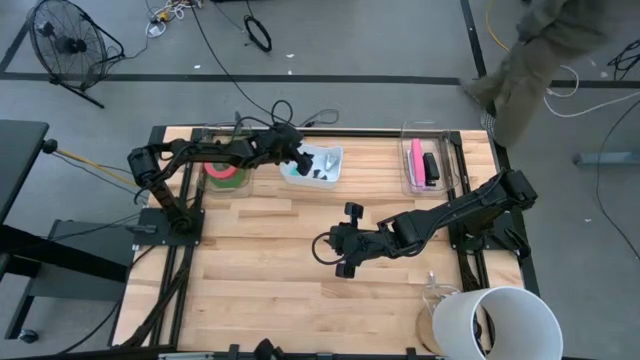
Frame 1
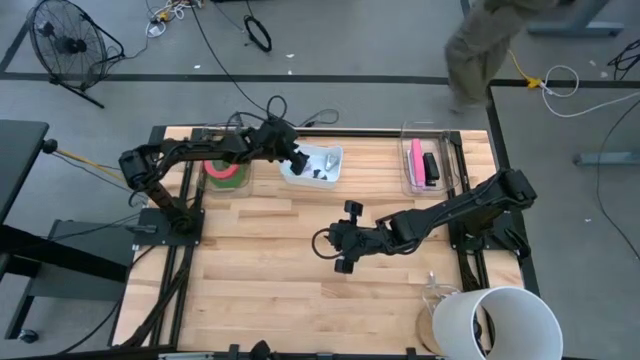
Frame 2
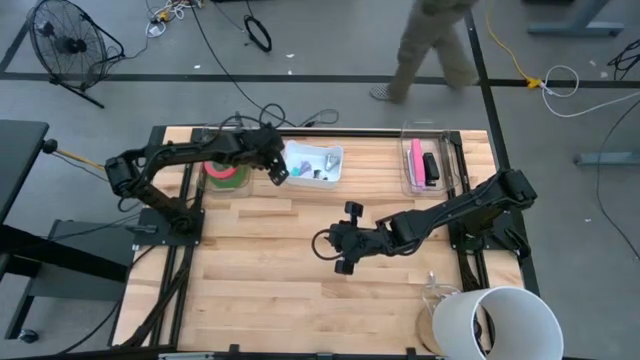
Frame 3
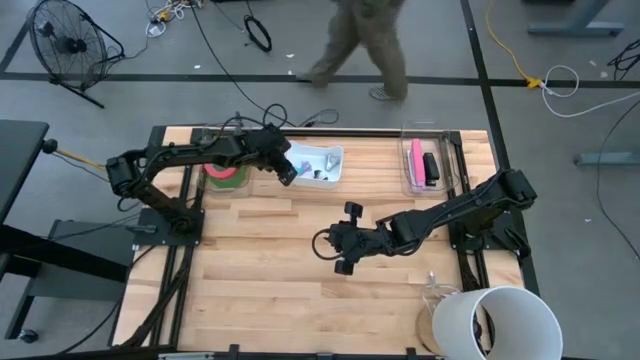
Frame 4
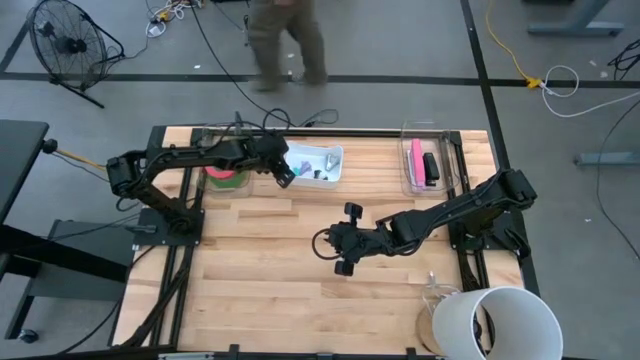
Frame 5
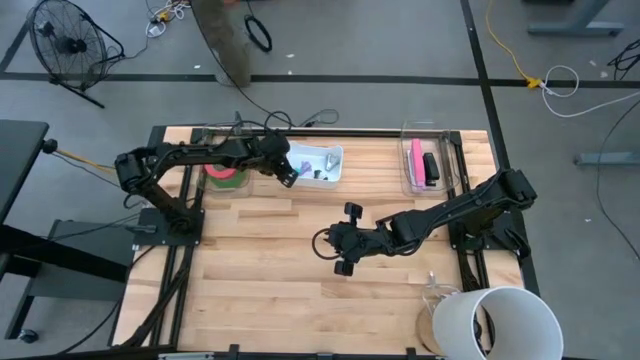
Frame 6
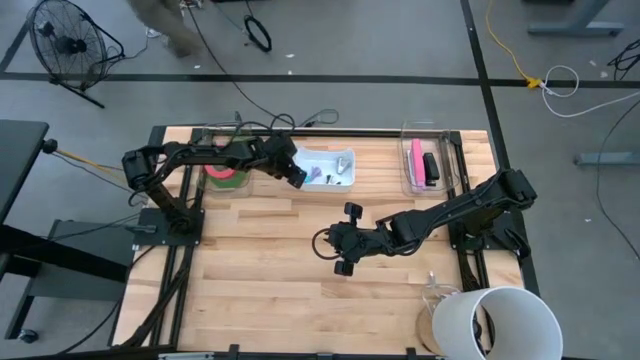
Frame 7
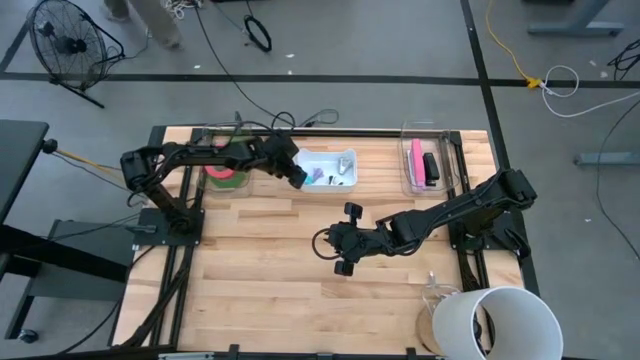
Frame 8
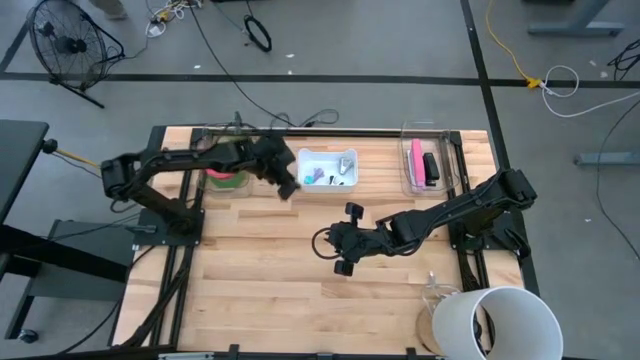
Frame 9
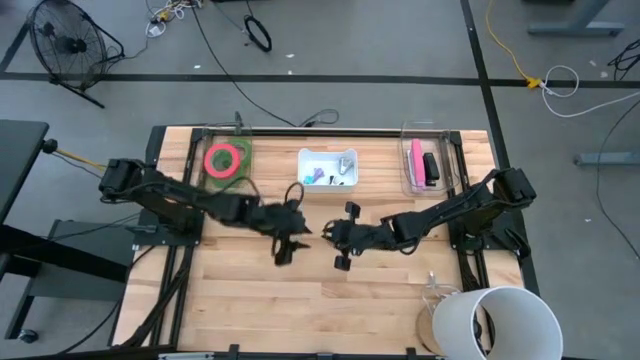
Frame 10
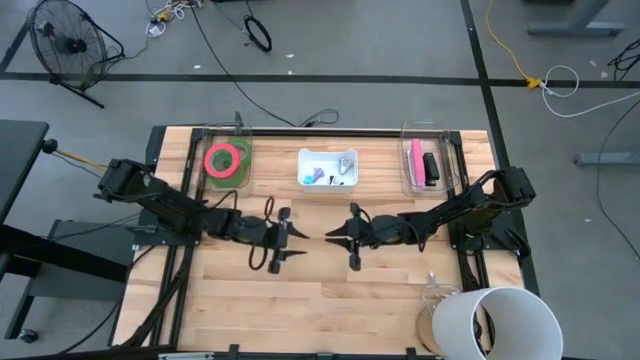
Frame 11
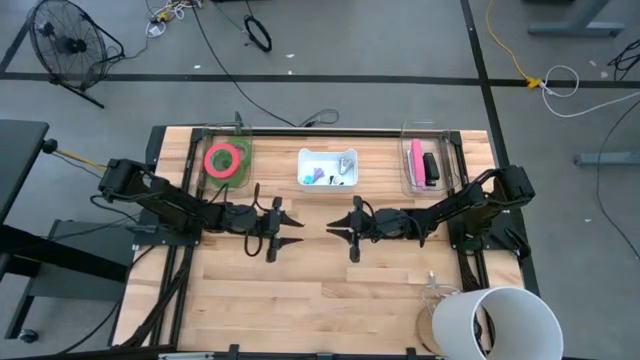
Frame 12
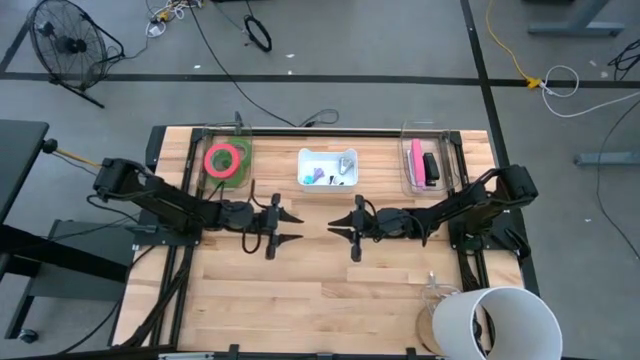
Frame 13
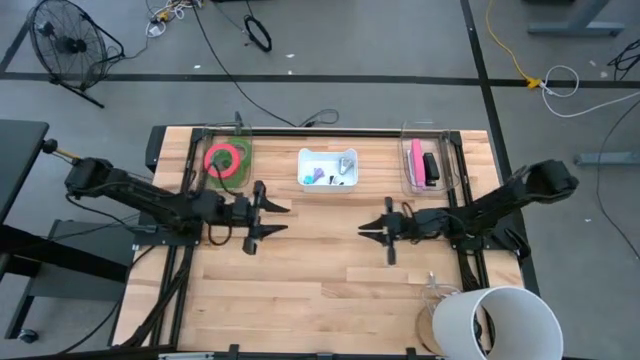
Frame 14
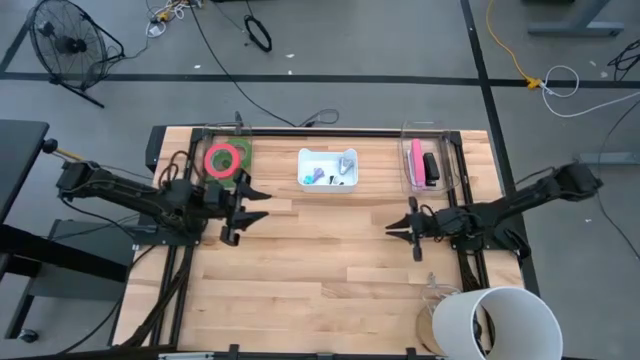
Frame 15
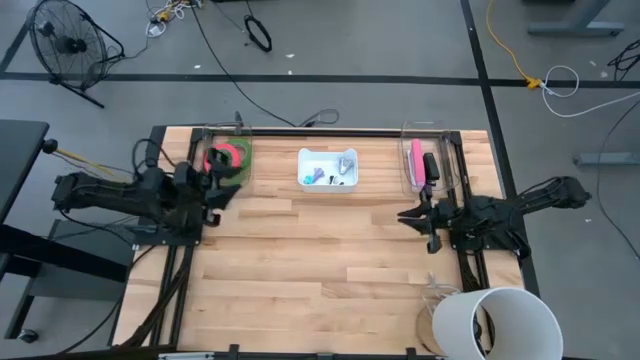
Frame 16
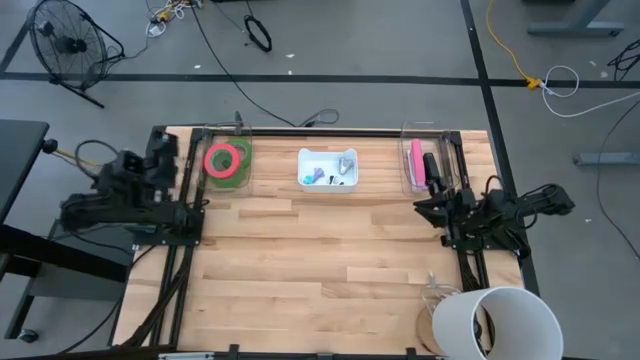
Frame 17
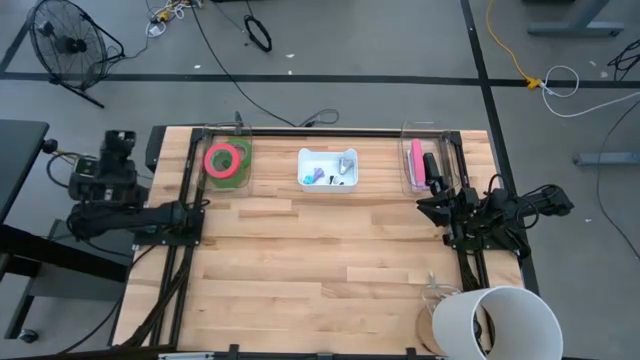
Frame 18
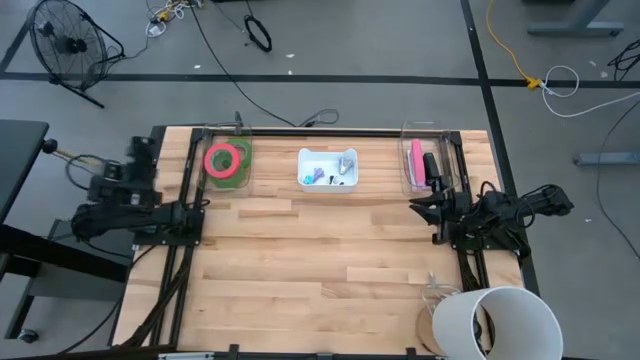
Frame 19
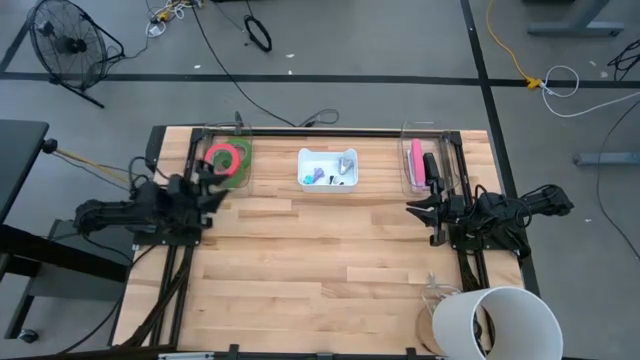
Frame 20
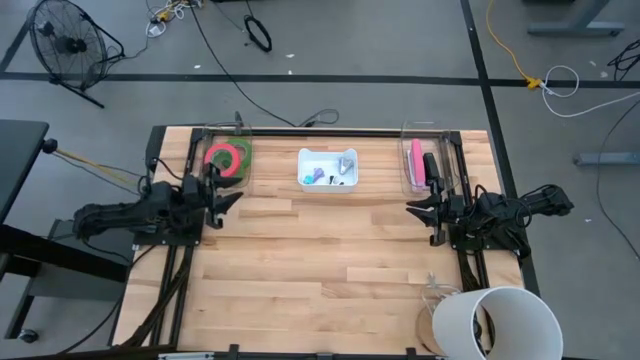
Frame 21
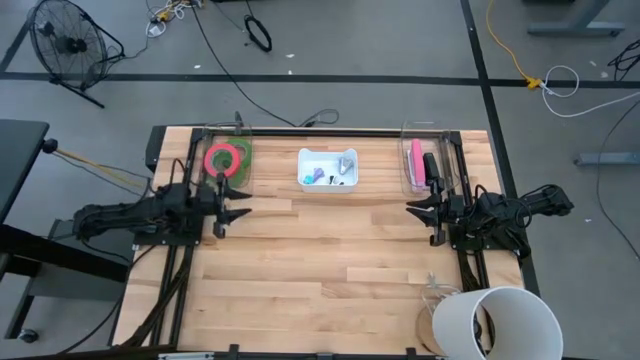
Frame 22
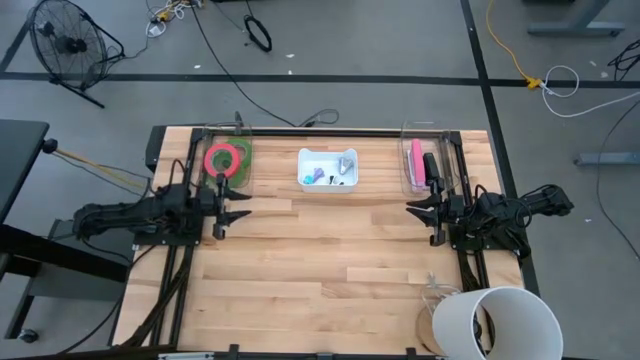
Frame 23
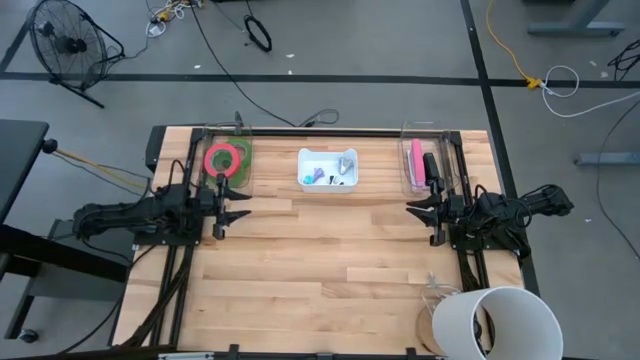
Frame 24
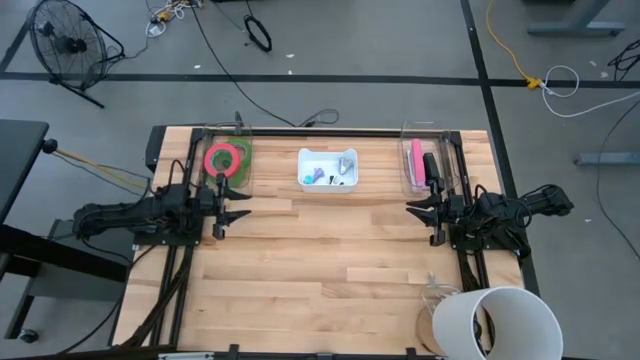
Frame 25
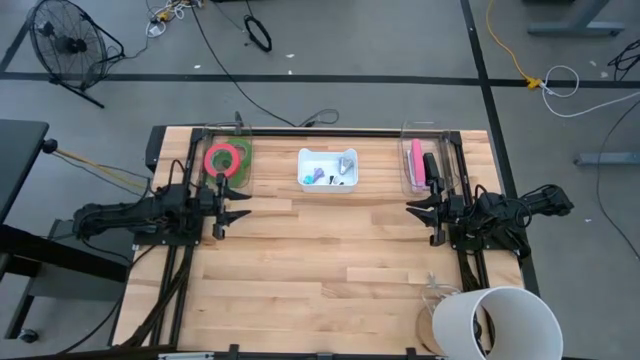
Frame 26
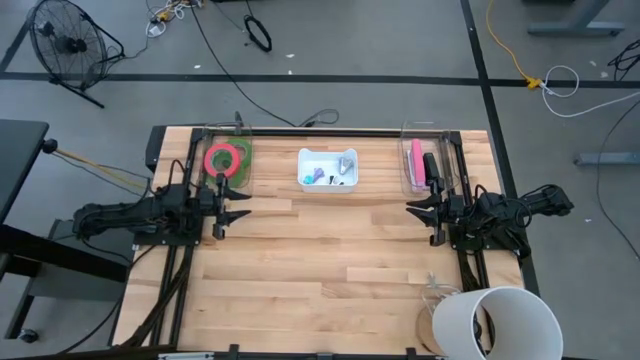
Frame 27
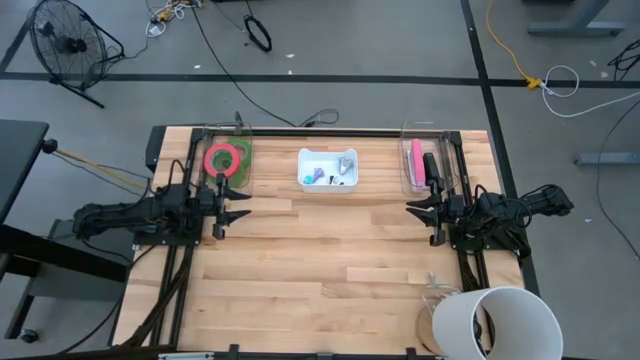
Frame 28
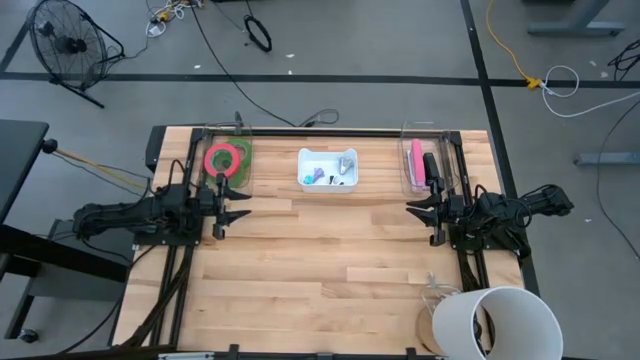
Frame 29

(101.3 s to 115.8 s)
Task: Pick and place Stapler, Stapler remover, tape
Return to Home Position

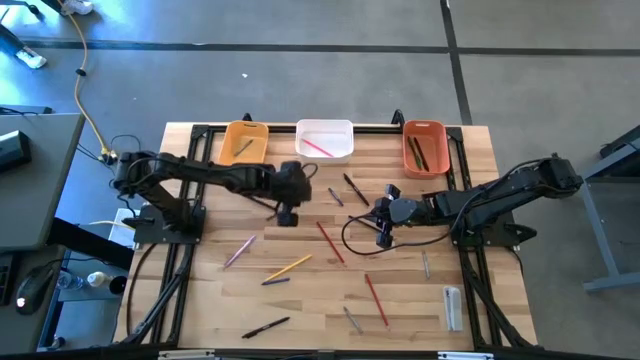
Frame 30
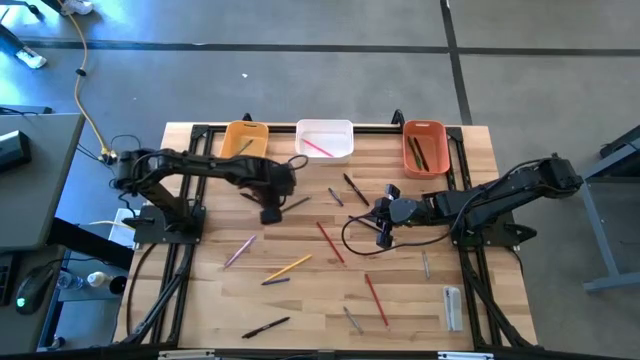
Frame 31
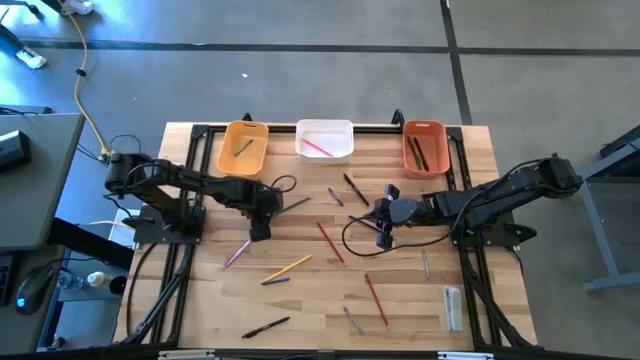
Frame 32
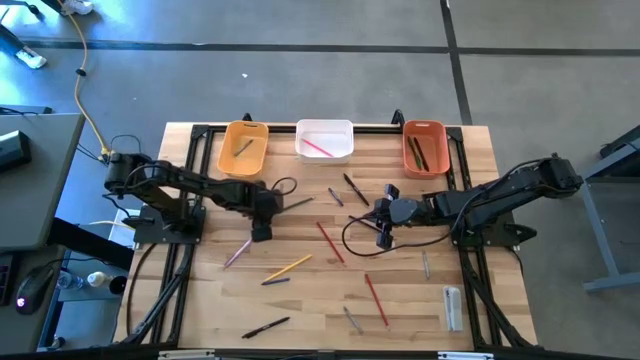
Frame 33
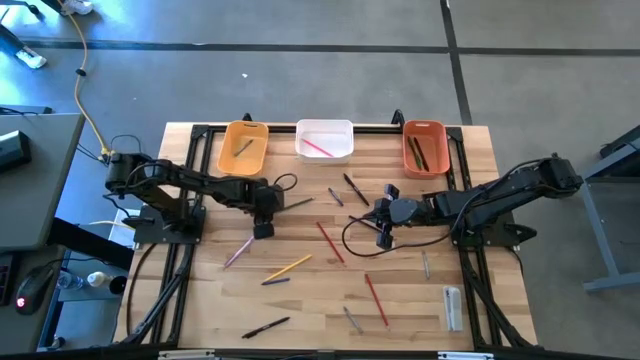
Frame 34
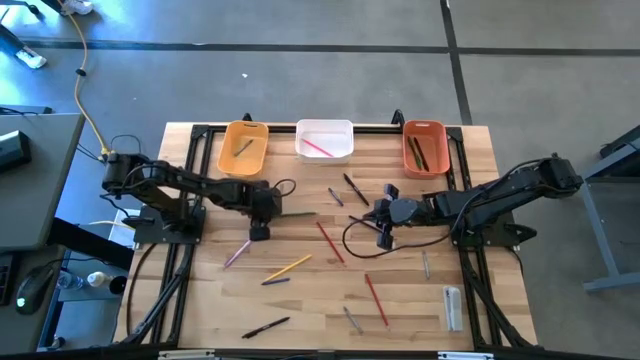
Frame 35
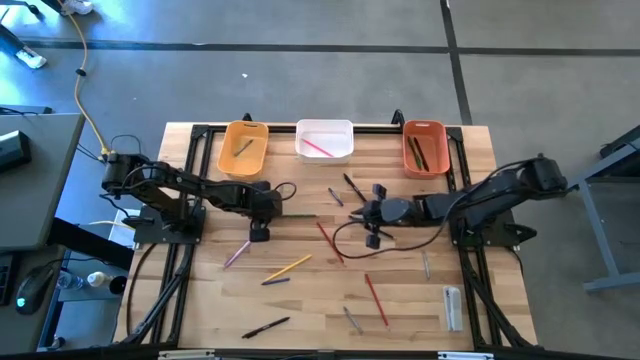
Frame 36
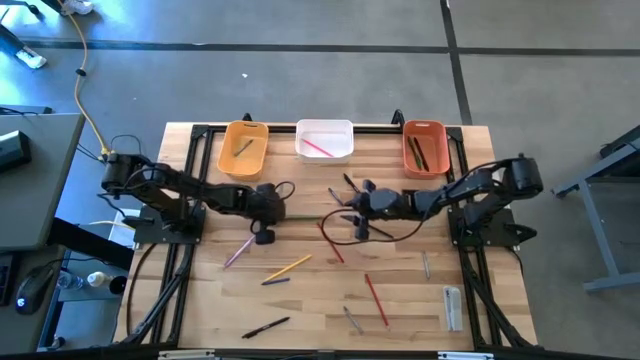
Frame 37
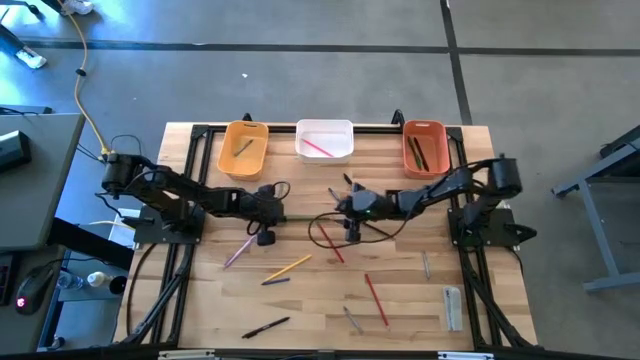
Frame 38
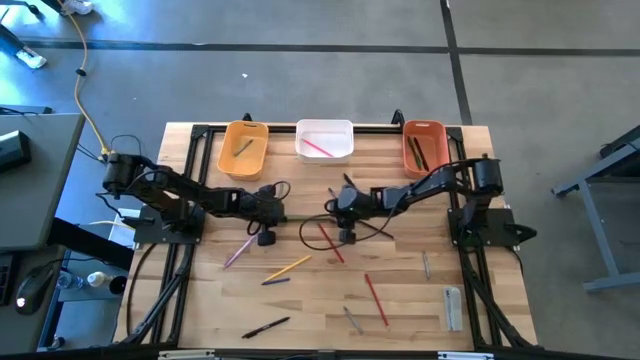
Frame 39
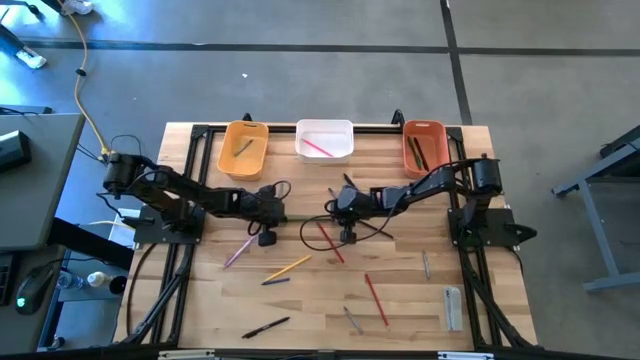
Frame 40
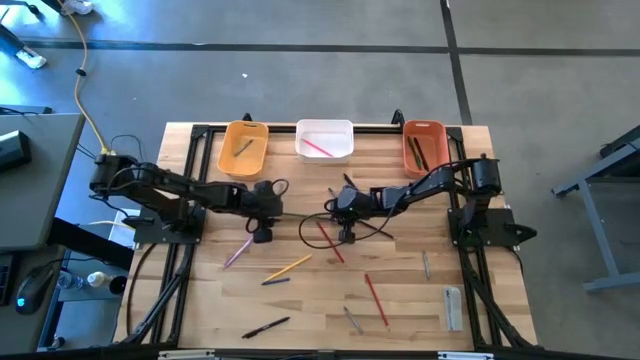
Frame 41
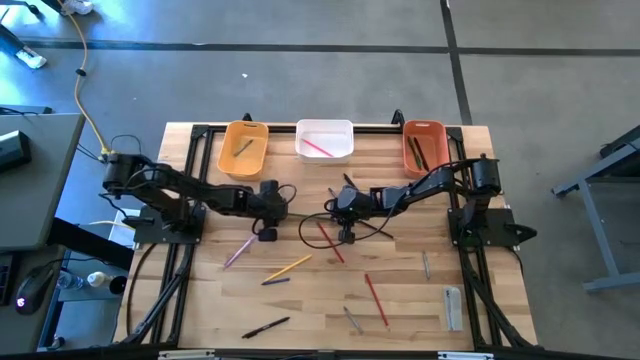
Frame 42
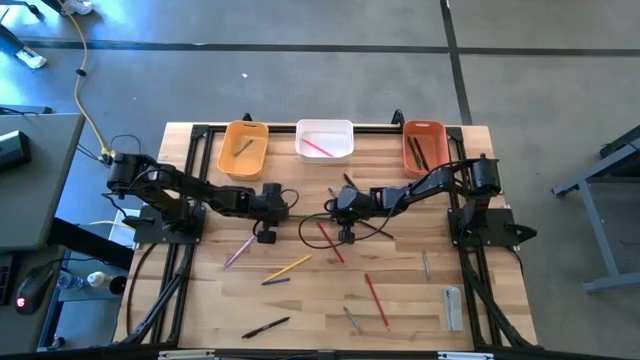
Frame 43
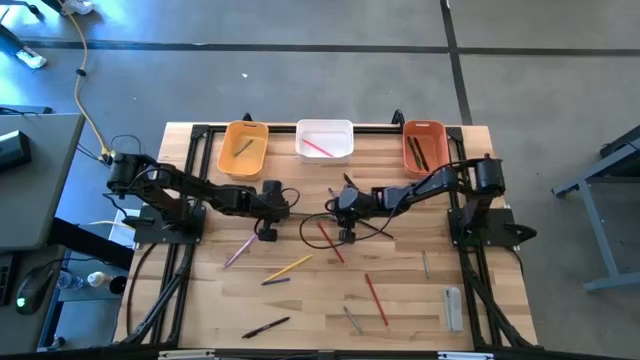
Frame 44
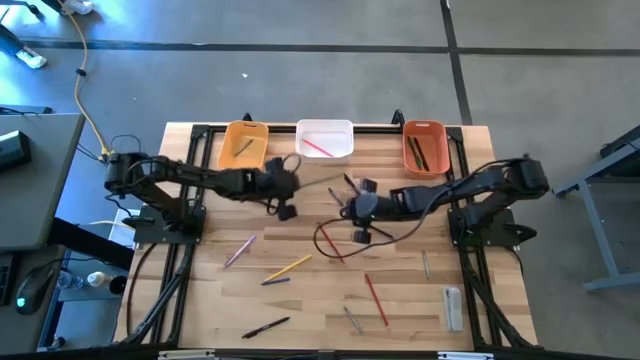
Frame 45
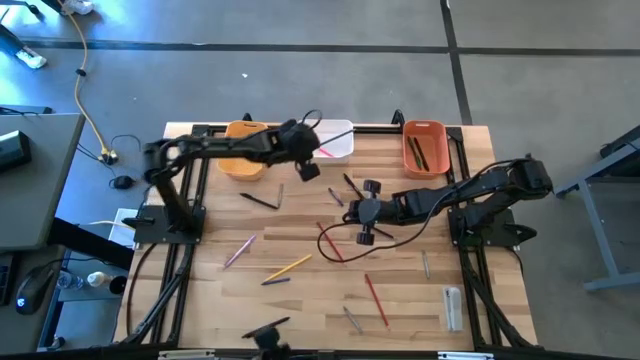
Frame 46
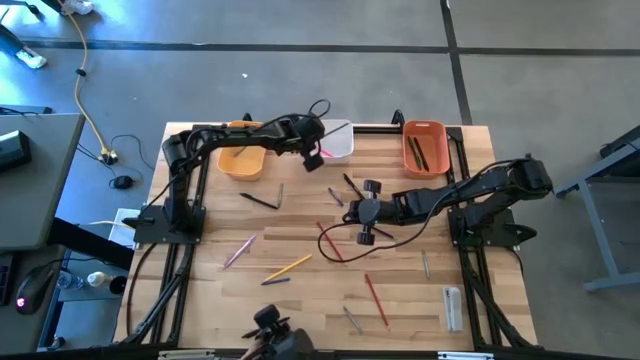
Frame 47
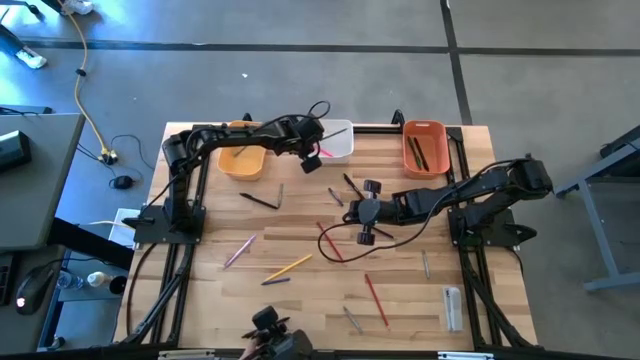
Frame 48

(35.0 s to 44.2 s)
Task: Sort crayons/erasers/pens/pencils in bins
Put the green color pencil into the orange bin
